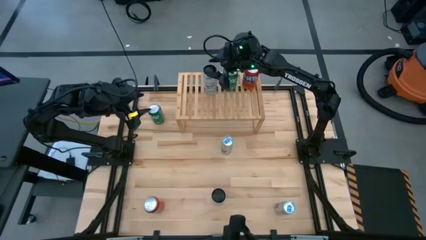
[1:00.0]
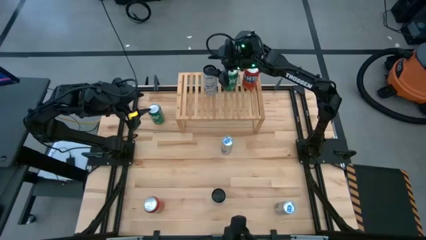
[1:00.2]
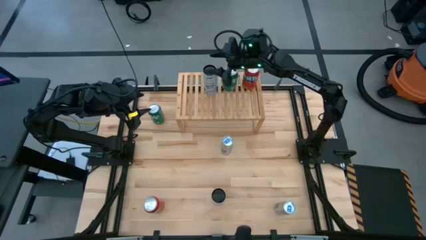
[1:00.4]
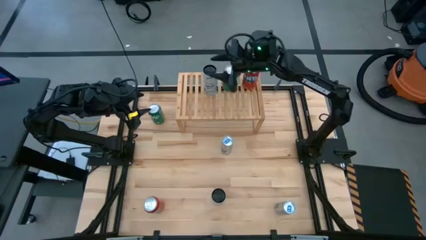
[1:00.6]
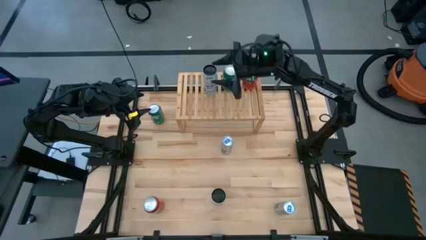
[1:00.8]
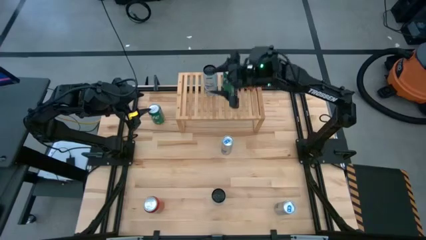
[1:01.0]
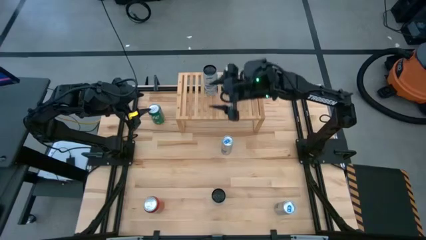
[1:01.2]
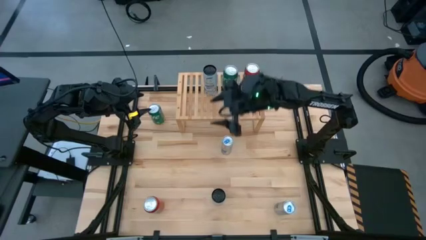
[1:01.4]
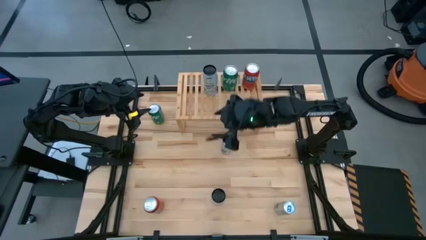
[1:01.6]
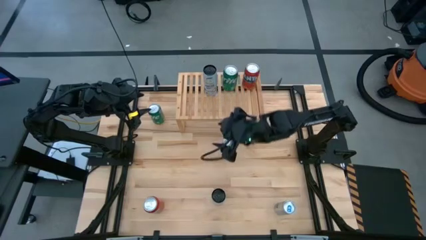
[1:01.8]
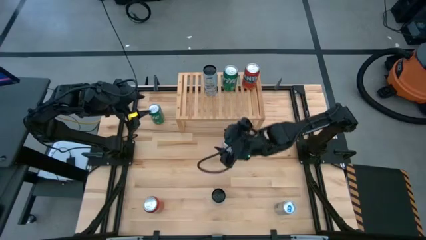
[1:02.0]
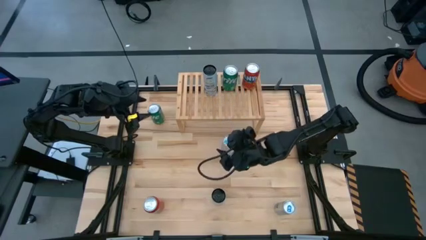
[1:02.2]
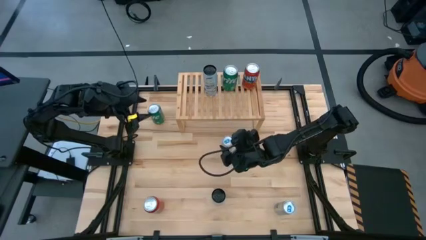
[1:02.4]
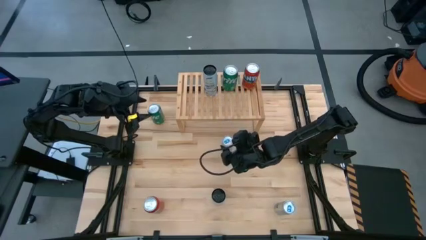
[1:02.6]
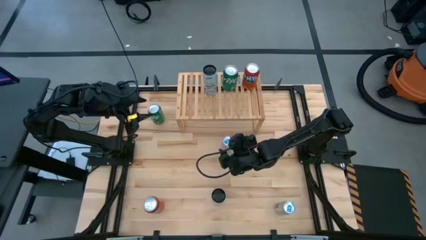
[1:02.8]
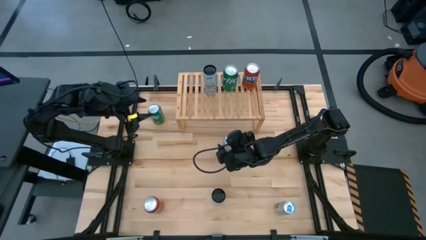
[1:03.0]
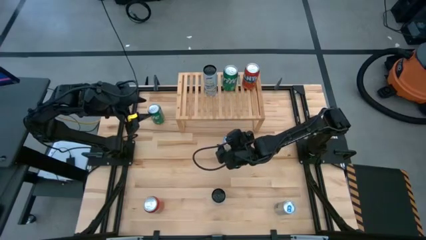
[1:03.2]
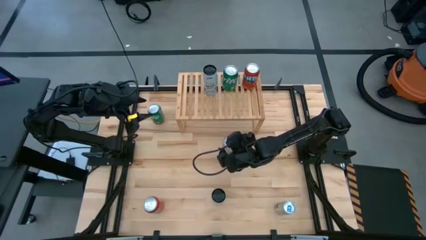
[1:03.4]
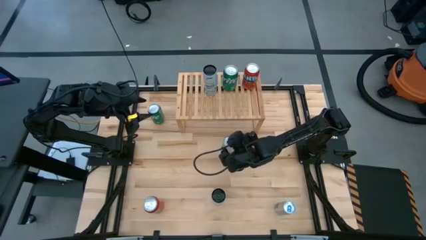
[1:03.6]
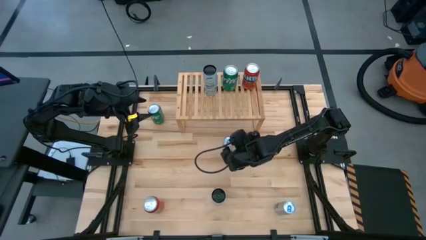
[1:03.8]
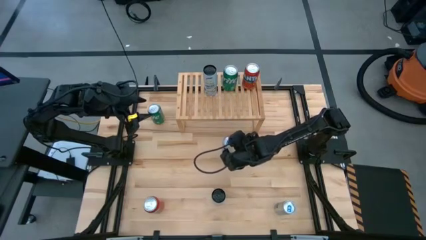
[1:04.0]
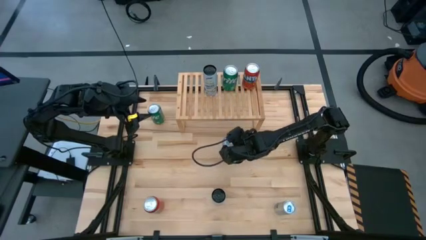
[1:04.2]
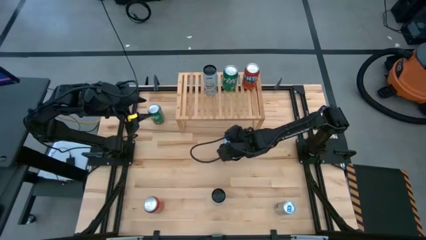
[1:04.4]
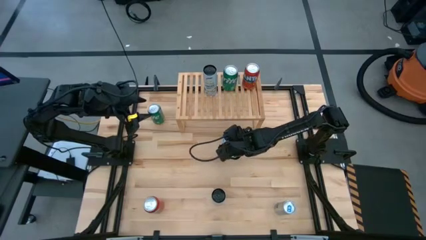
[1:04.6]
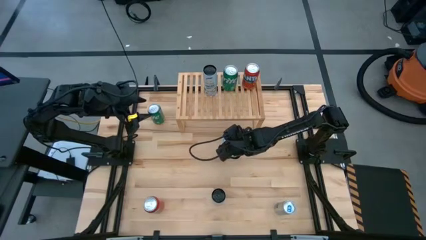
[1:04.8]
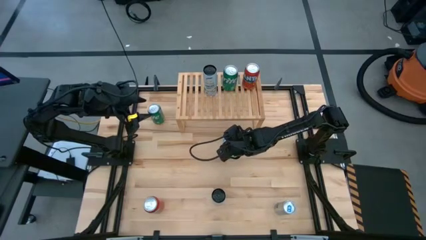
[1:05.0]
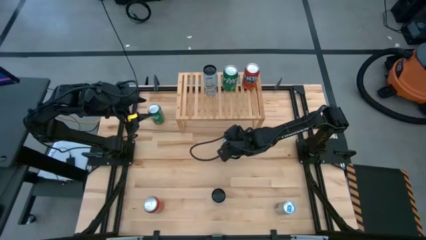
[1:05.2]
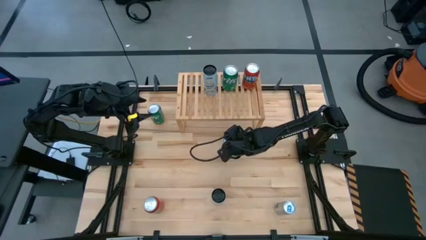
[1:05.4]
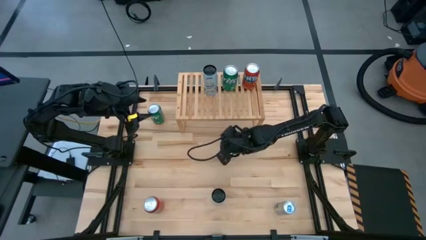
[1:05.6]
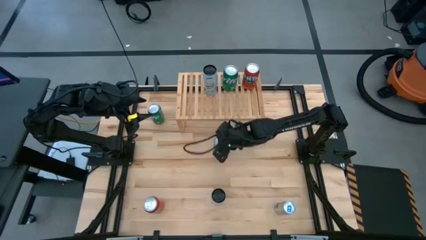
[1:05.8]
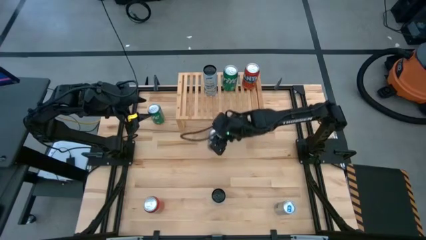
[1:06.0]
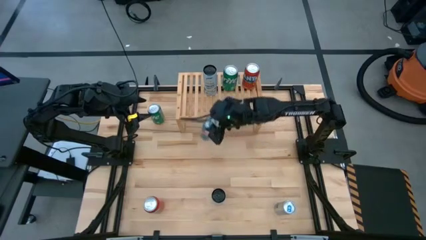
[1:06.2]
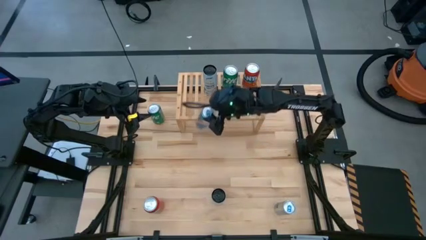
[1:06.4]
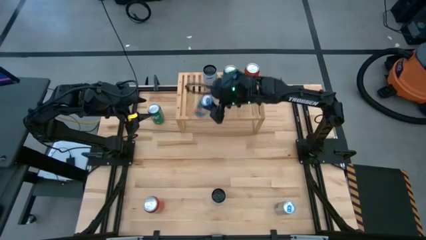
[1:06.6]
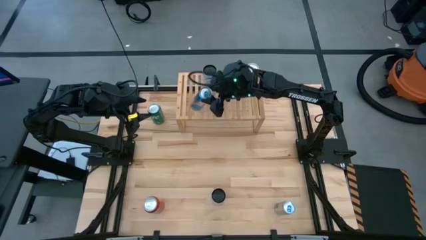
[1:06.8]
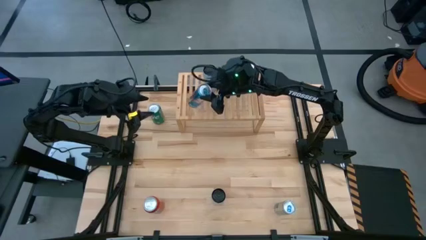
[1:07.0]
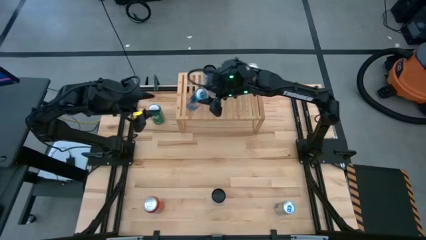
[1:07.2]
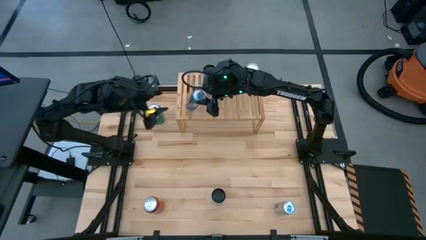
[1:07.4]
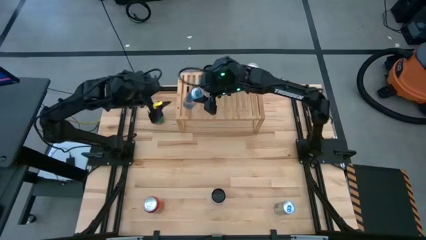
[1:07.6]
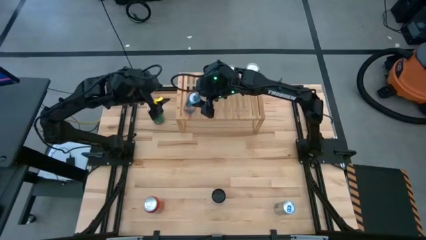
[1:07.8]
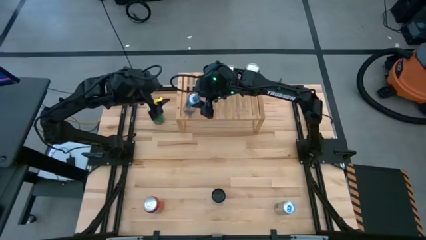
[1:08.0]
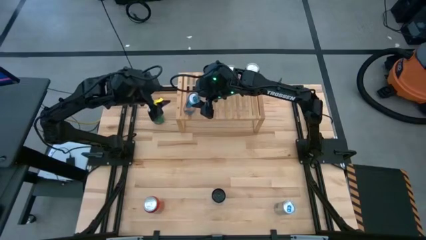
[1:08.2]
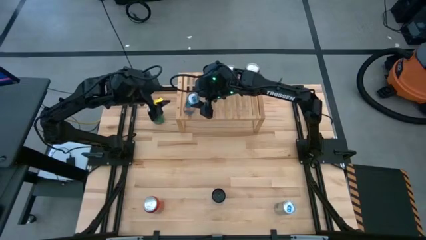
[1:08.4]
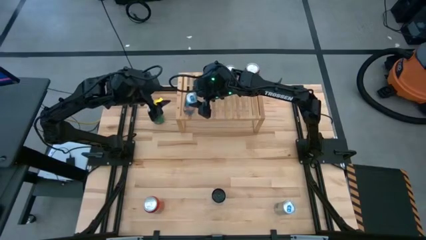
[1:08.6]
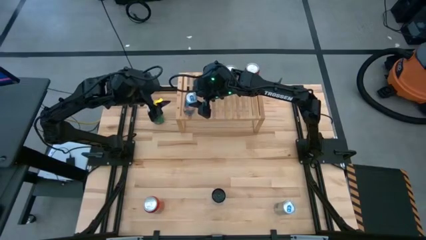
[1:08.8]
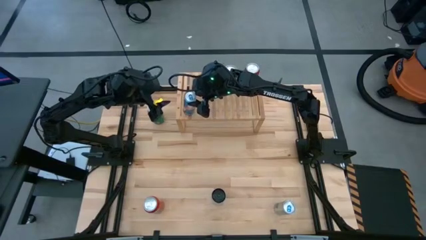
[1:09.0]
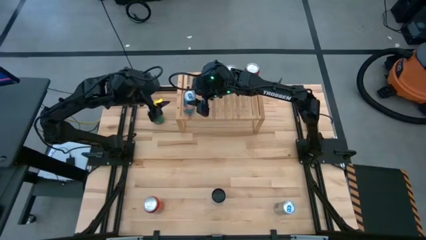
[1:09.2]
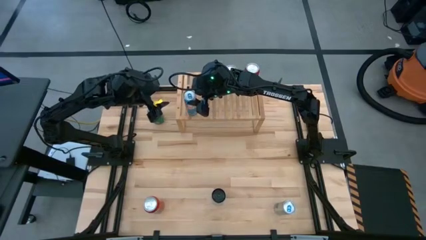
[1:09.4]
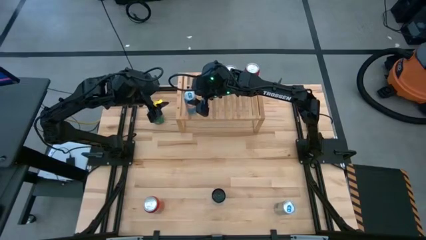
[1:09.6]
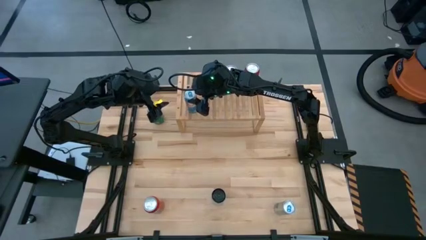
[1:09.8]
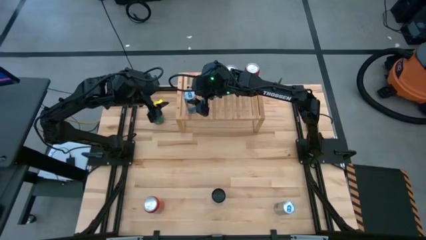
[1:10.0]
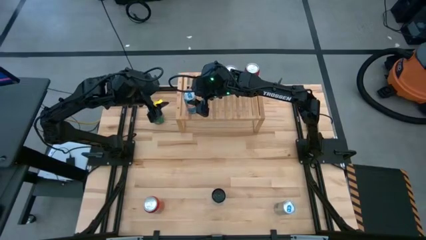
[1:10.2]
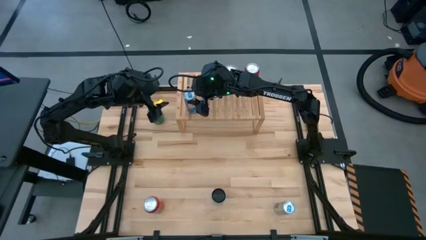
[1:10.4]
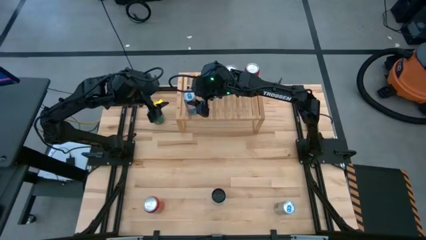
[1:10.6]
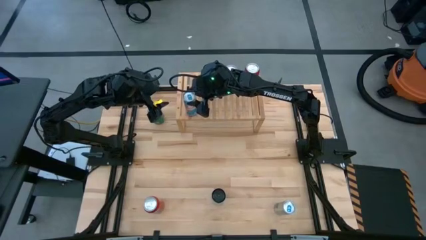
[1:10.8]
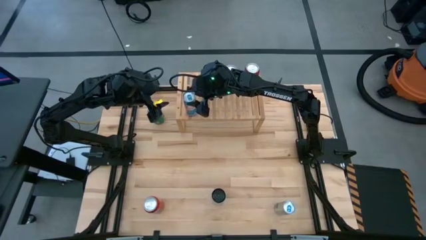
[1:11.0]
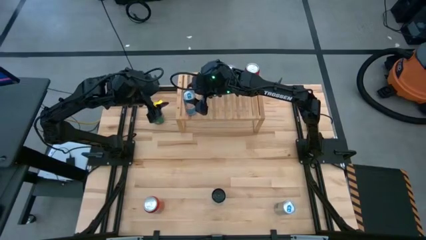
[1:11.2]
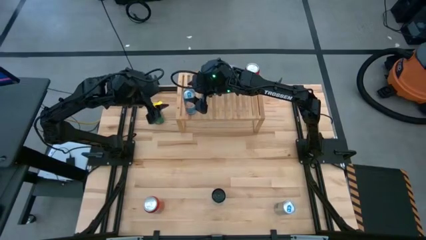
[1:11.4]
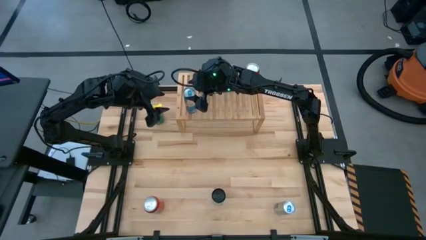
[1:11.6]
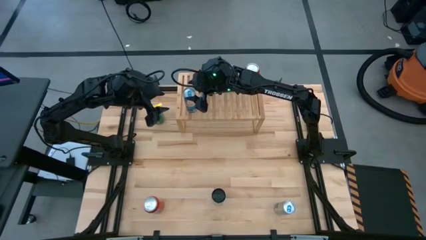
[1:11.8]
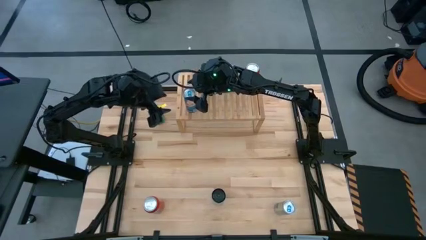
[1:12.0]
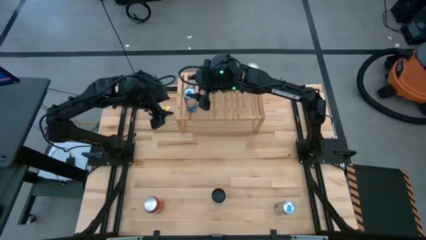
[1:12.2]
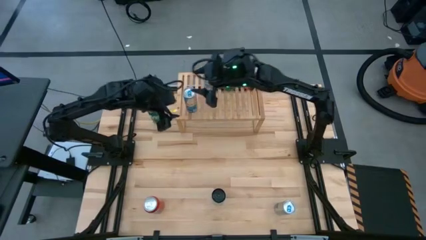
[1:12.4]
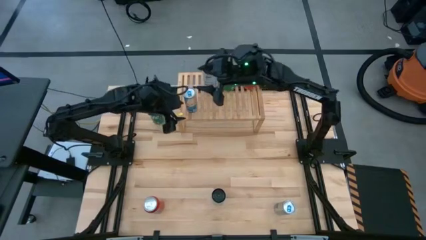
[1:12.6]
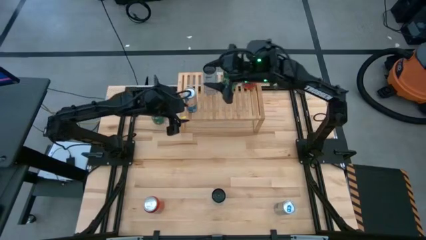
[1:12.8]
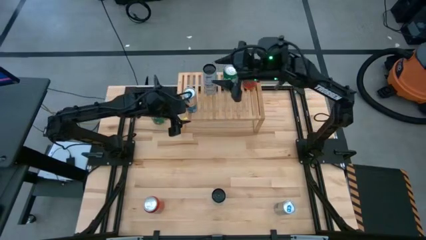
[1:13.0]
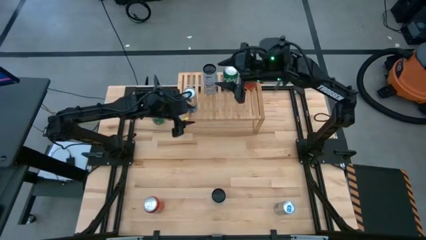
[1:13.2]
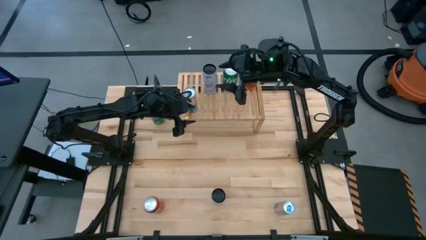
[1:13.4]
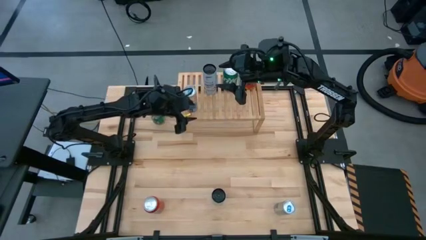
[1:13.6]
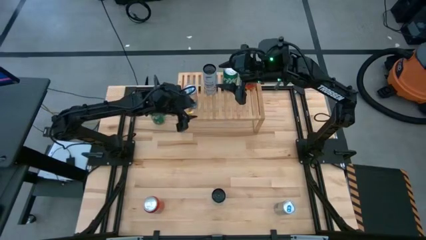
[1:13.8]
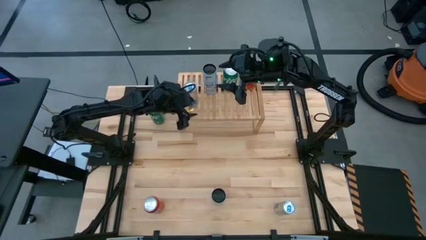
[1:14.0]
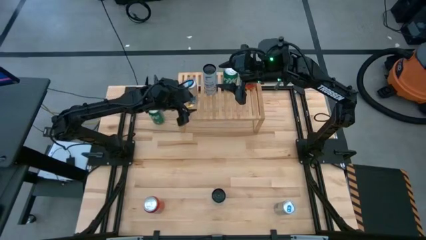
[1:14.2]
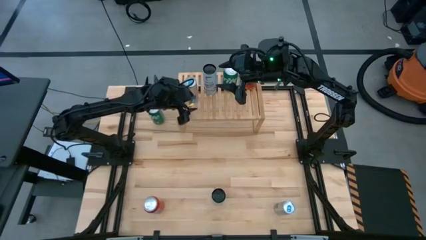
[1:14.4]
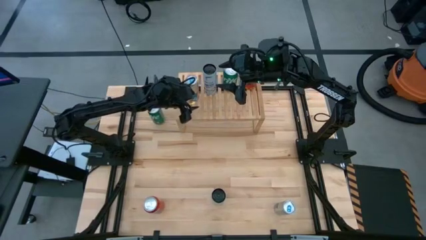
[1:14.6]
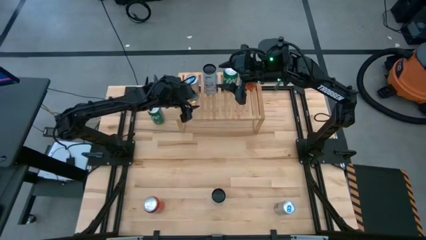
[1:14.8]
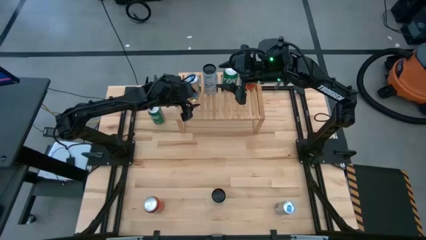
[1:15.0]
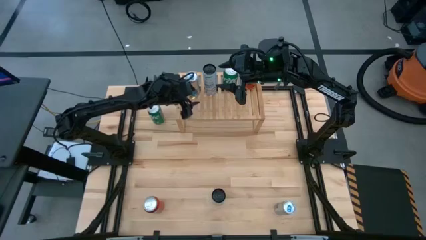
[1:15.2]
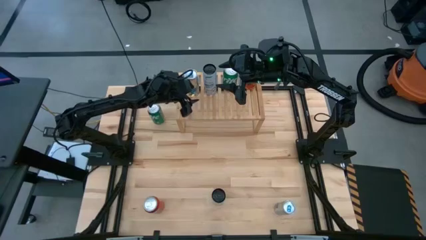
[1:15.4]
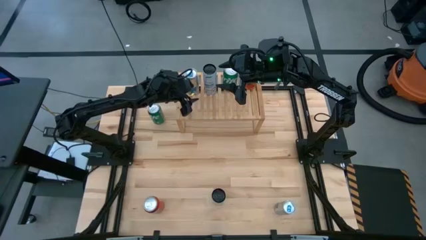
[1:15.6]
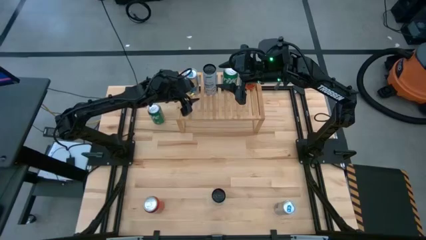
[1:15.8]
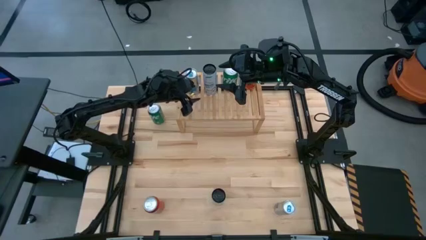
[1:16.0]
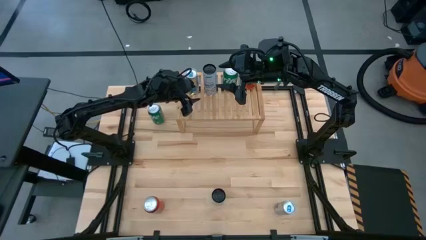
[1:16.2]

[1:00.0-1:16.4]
Task: Place canned beverage on shelf
Put the top blue soda can on the shelf
